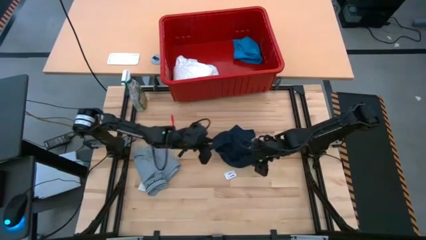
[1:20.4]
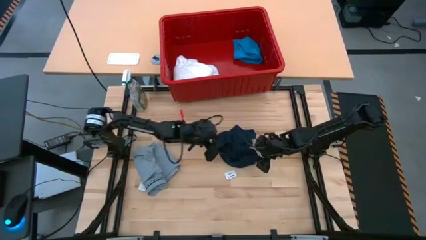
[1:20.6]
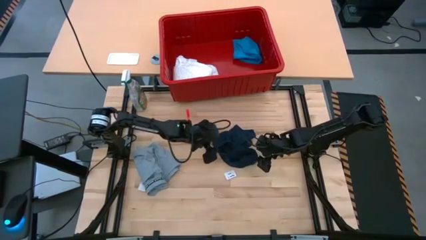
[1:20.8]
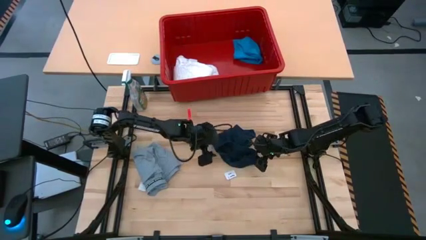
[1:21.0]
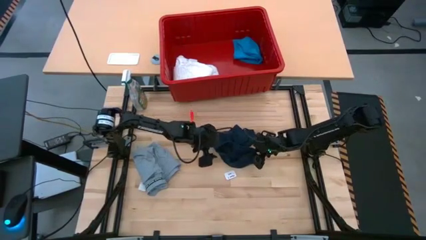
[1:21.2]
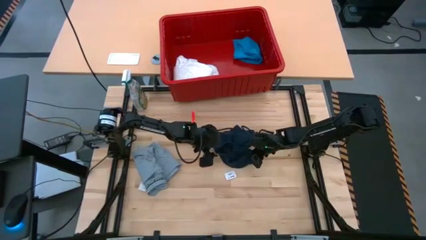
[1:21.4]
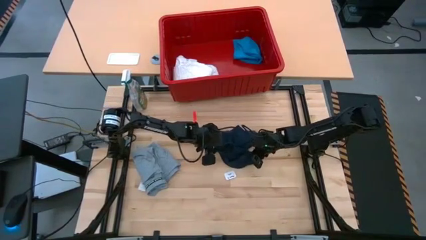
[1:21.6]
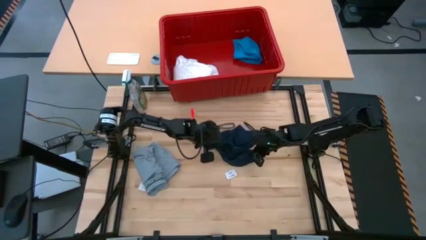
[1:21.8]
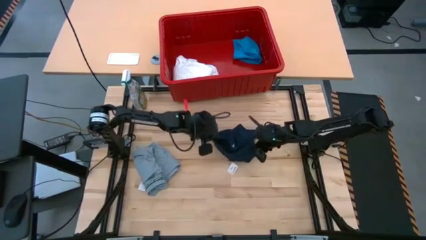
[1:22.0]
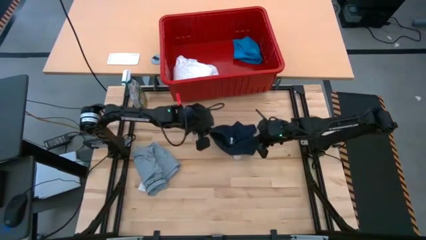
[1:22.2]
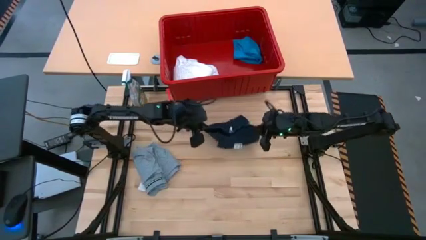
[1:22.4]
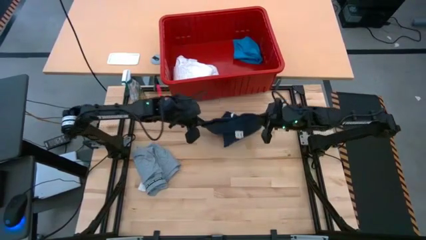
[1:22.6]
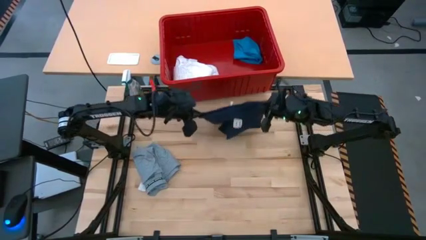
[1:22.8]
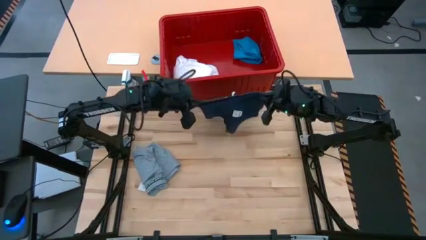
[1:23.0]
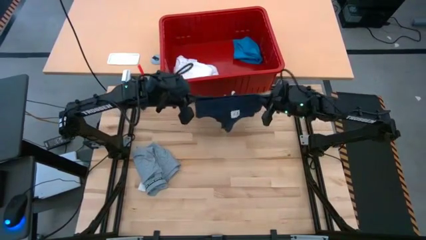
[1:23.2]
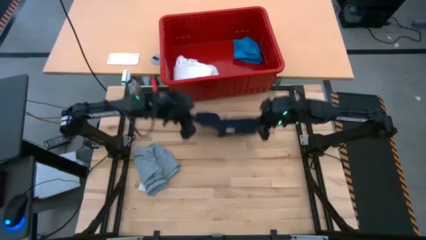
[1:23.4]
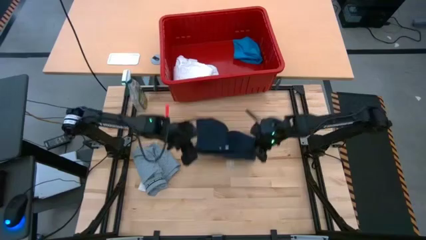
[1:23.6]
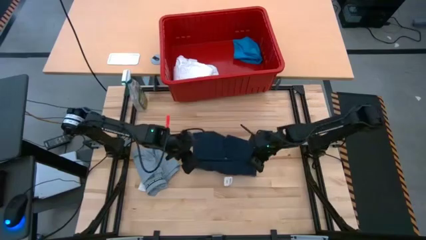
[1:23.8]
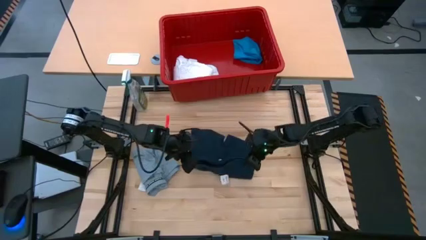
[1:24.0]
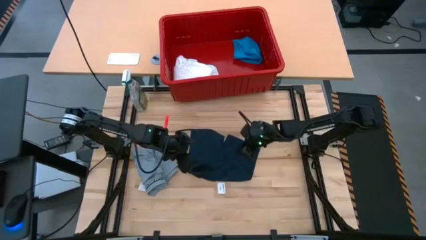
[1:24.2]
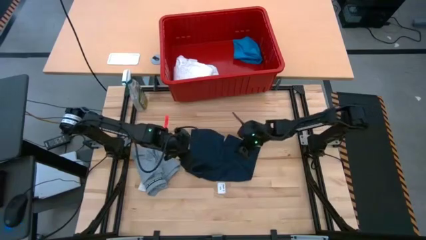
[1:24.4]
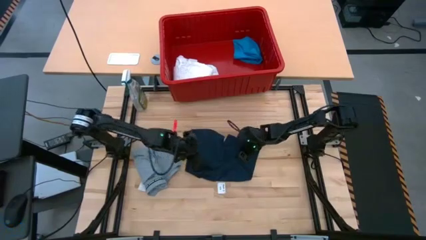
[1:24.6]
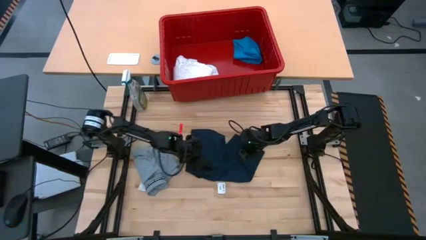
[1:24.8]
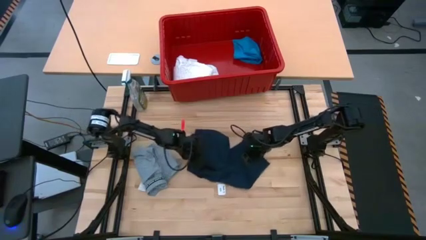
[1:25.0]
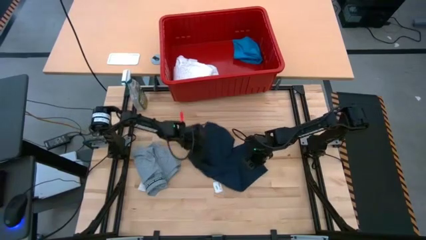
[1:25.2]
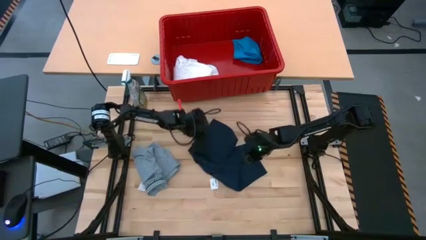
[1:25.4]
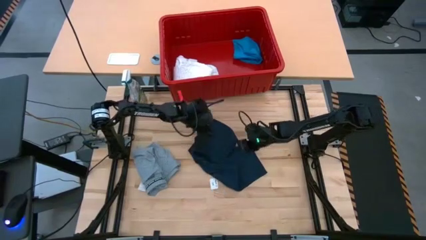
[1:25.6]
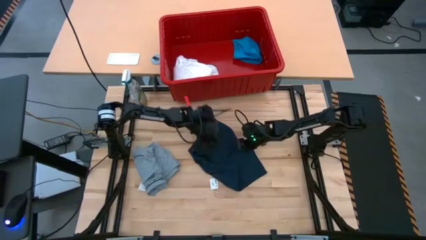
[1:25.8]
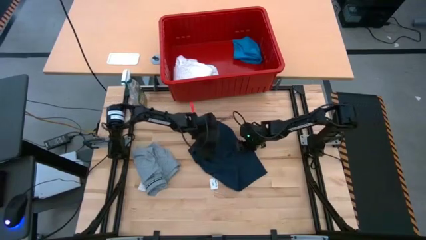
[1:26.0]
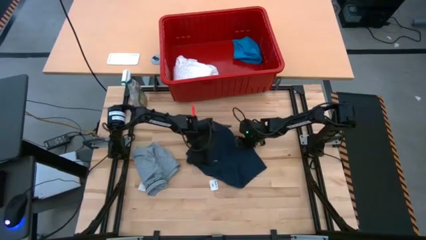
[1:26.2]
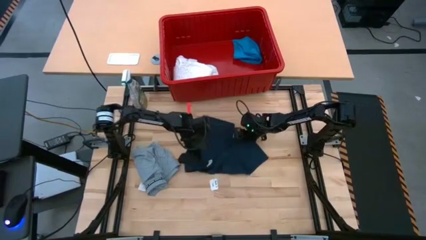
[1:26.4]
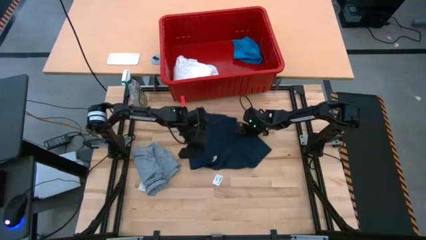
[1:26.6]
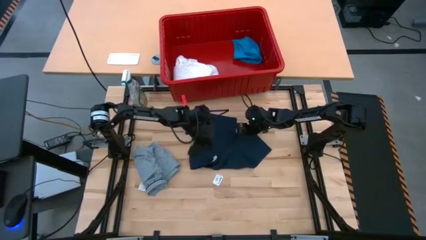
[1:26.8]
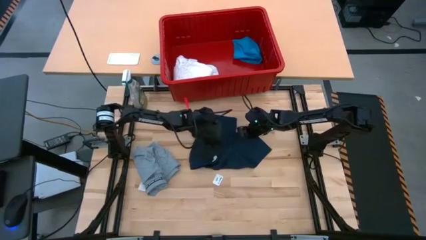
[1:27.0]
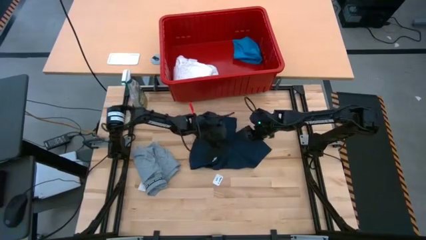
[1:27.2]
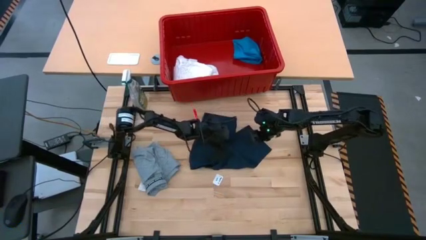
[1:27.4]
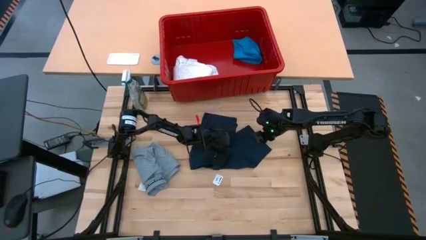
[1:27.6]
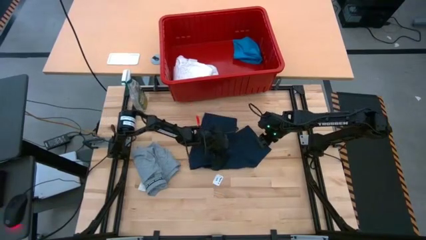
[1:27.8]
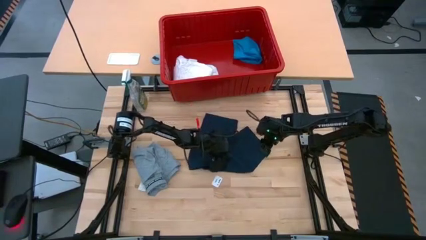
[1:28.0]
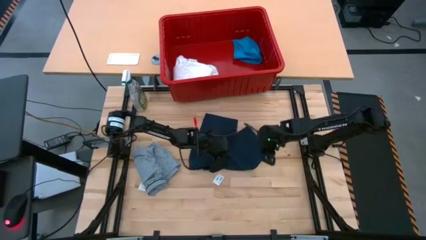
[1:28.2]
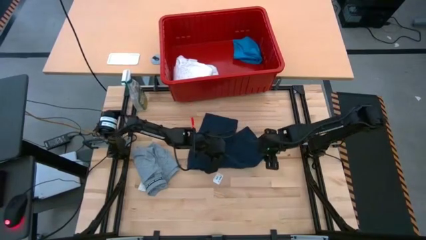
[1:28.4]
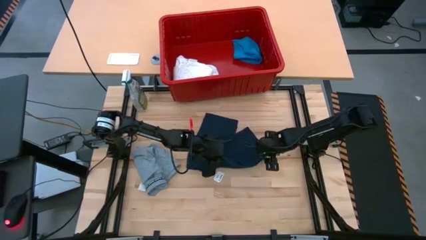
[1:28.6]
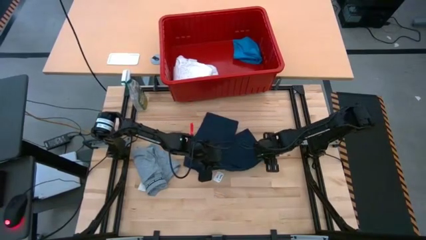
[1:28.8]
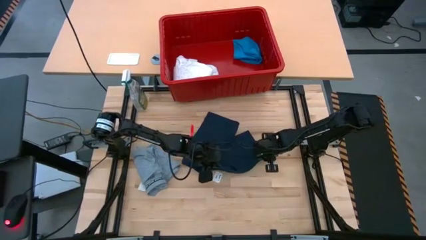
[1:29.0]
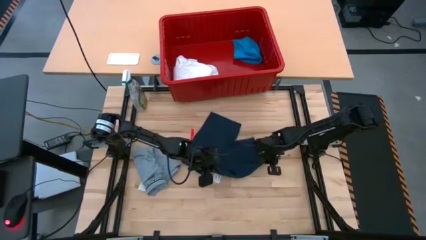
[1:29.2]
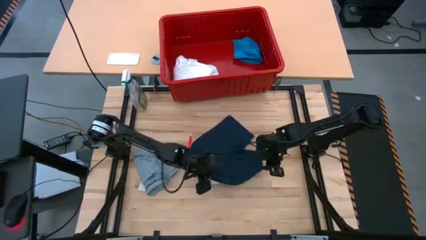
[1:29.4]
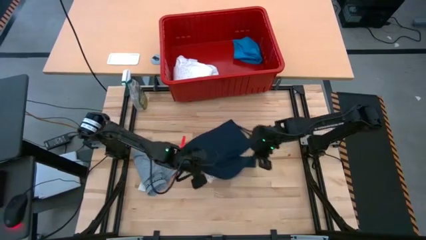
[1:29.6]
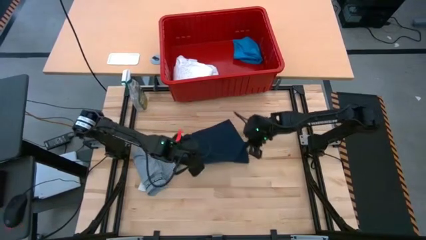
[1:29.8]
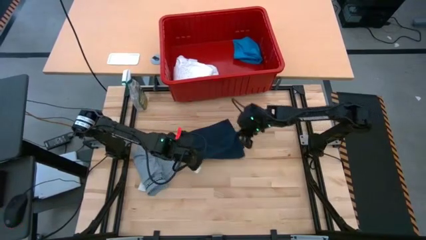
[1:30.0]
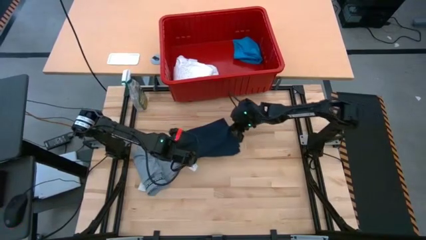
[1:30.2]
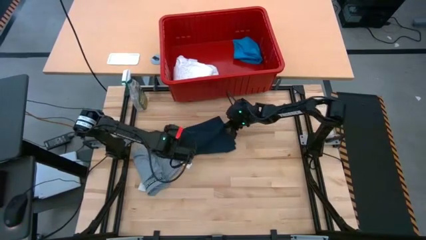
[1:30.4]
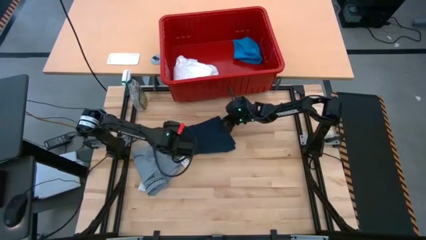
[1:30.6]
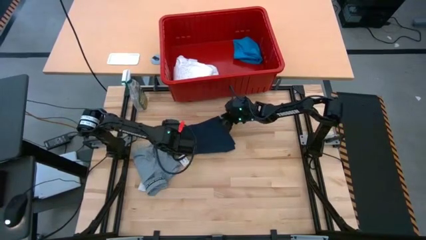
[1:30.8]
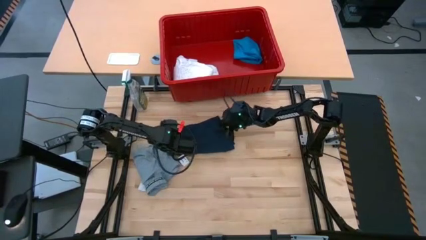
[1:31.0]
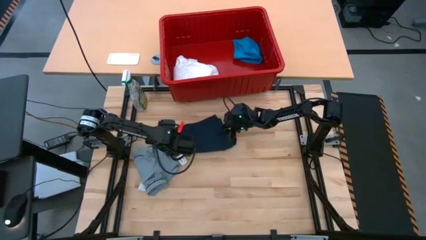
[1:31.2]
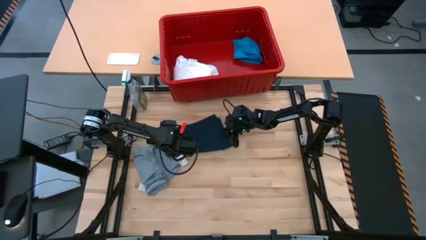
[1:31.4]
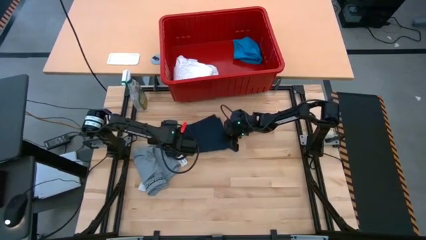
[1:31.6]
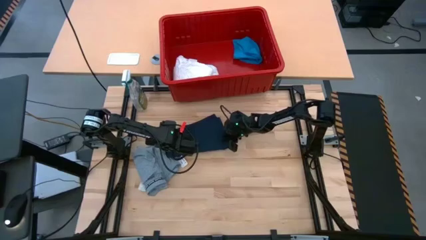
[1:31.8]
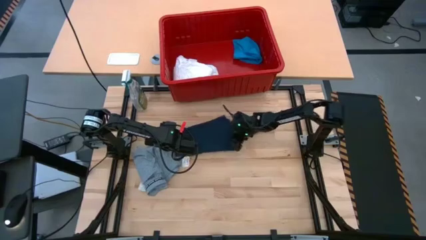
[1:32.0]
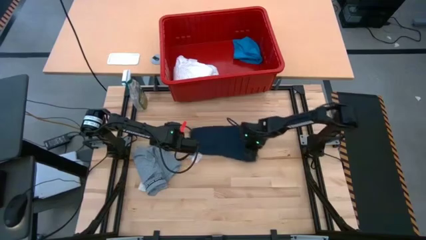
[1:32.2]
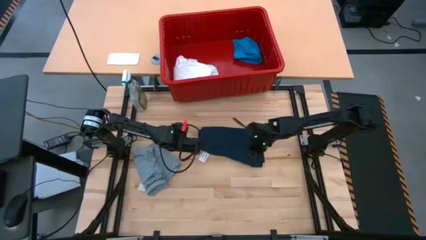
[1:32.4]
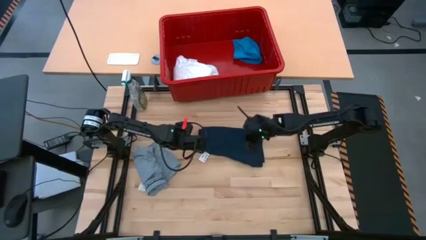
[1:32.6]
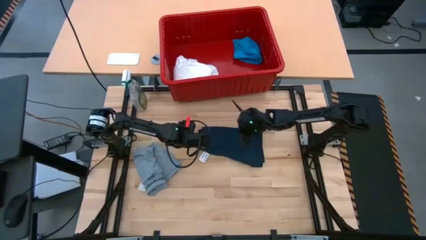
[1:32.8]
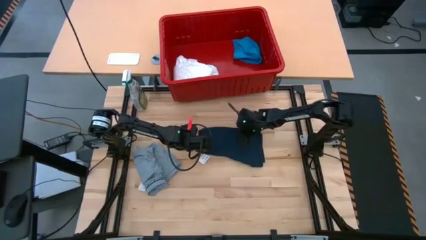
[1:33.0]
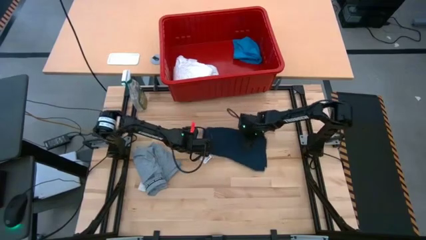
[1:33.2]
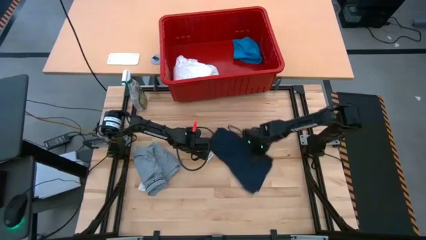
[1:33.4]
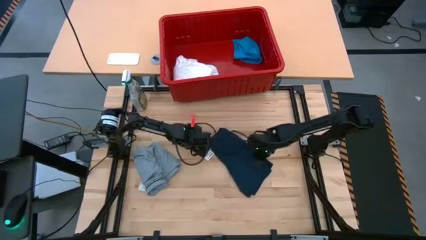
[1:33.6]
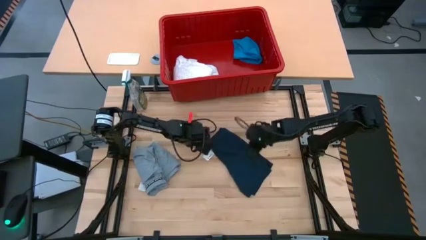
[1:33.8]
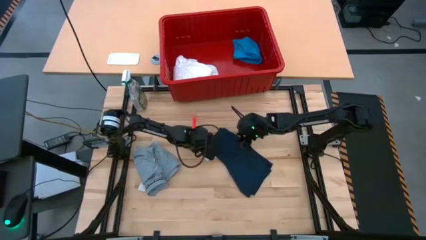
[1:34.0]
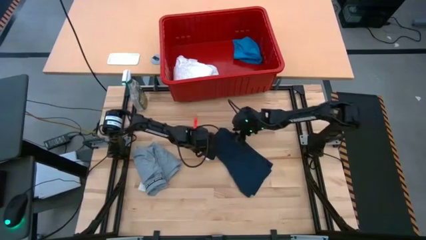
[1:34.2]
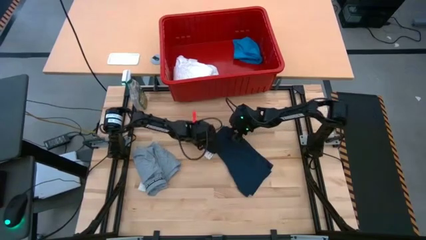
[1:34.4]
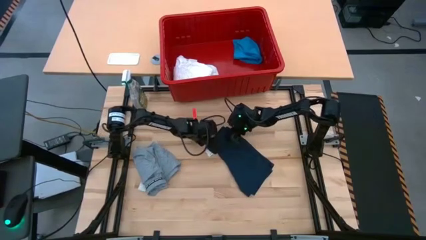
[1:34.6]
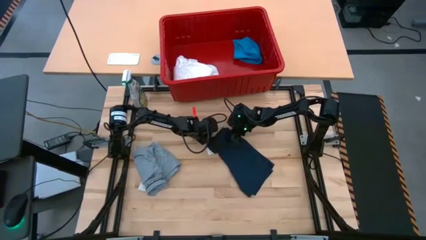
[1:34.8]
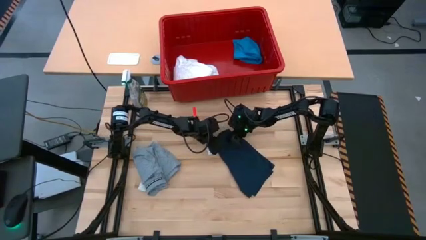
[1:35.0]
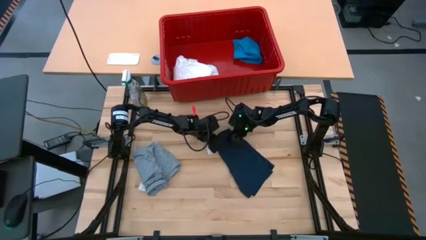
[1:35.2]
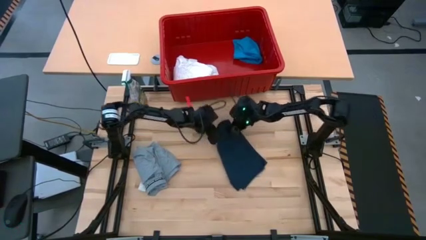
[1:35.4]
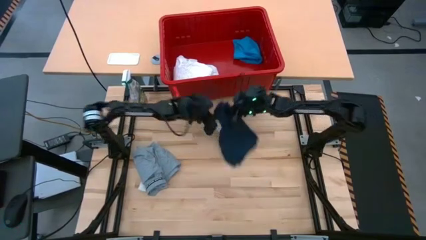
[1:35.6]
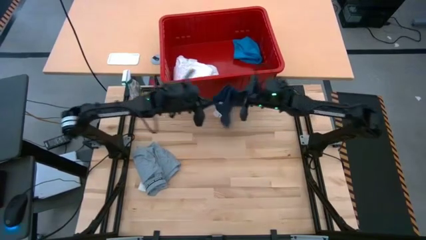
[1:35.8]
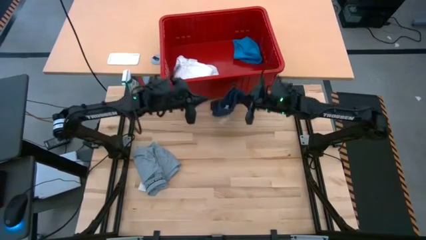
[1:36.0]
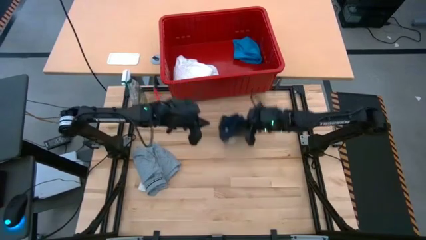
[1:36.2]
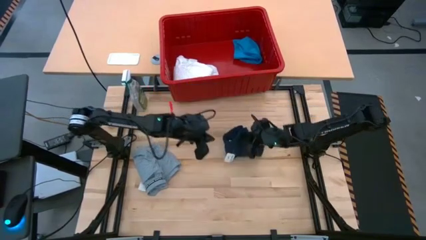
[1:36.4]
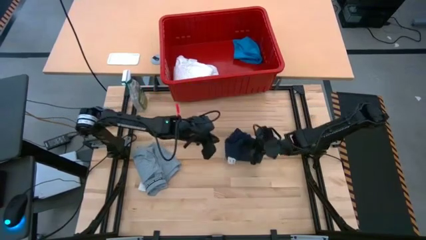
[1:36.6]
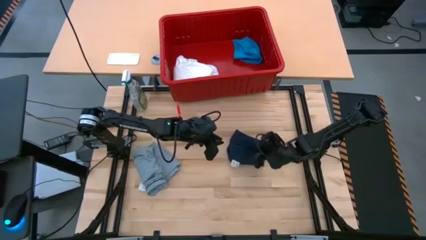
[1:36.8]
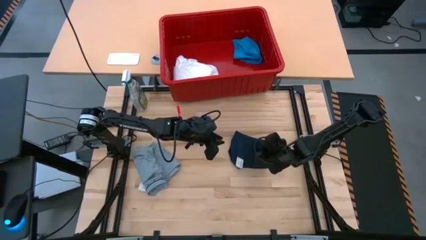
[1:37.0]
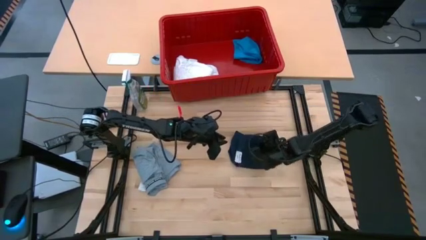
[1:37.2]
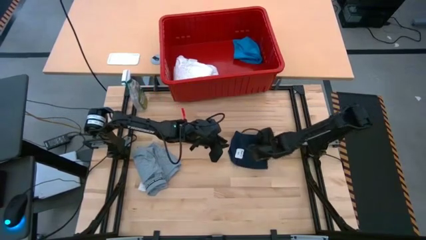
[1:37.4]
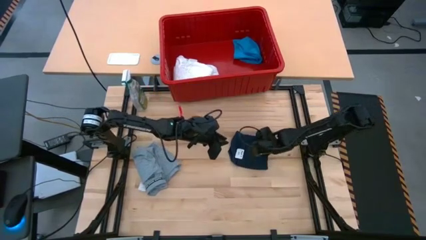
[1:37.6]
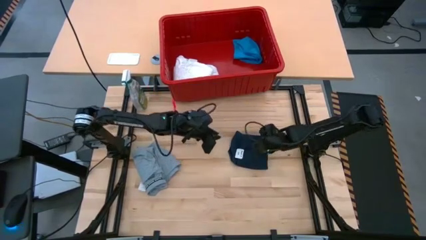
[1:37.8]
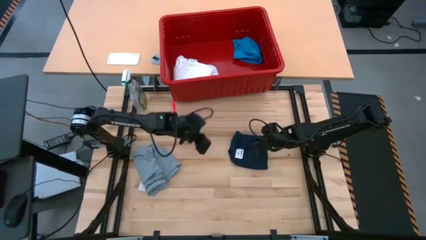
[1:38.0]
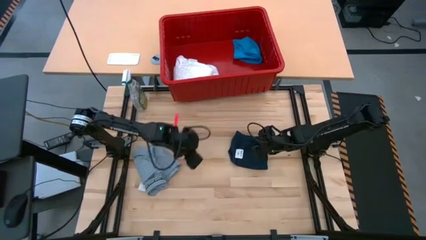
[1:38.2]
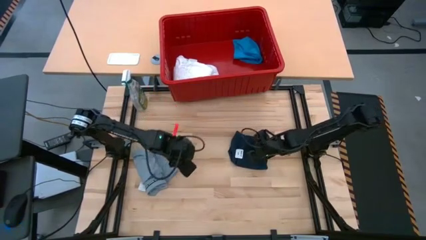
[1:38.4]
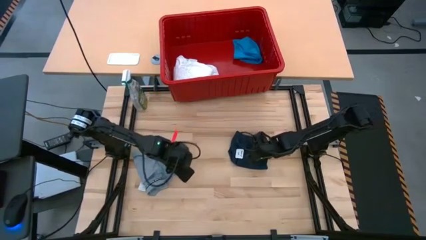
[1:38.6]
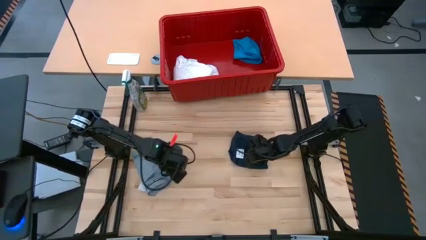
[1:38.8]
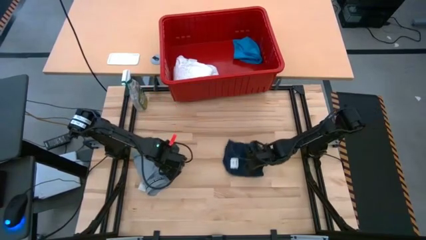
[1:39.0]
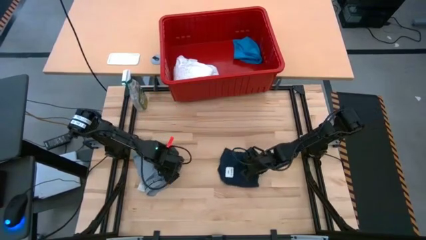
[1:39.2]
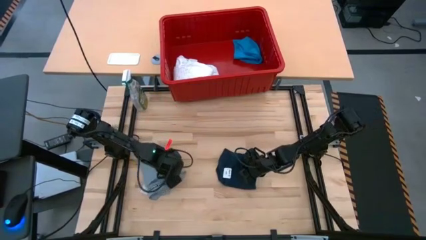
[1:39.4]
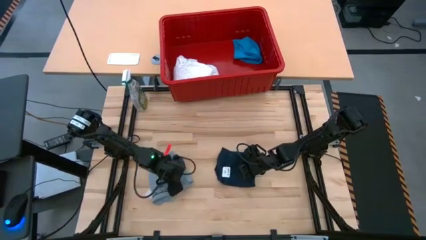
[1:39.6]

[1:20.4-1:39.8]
Task: Fold laundry
Fold the black pants
